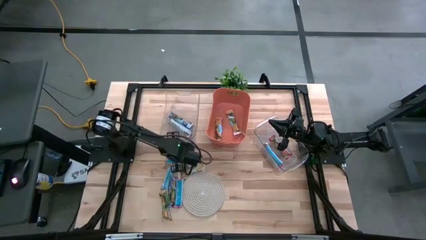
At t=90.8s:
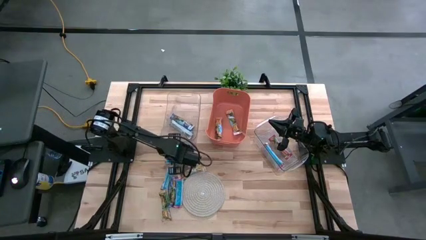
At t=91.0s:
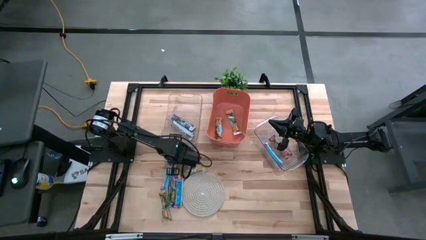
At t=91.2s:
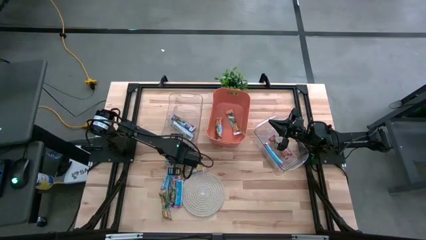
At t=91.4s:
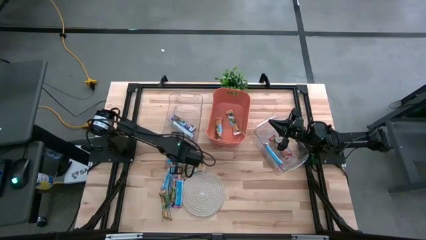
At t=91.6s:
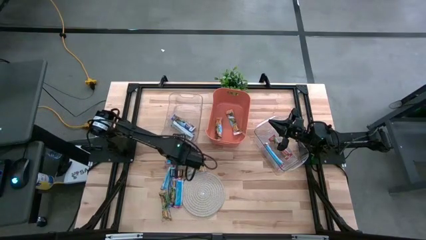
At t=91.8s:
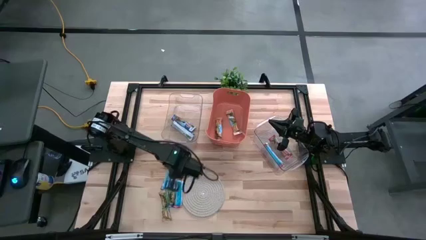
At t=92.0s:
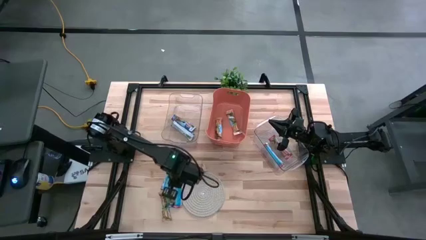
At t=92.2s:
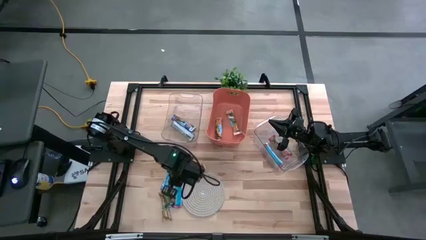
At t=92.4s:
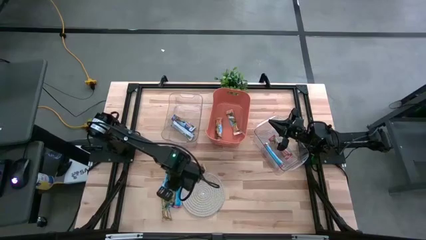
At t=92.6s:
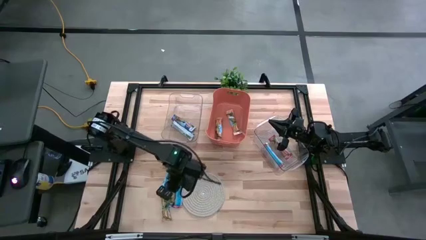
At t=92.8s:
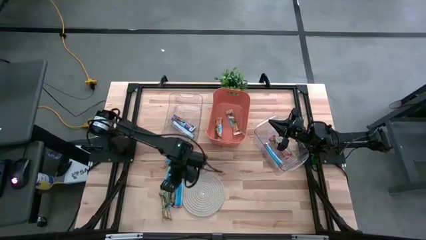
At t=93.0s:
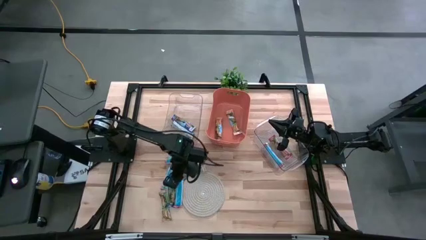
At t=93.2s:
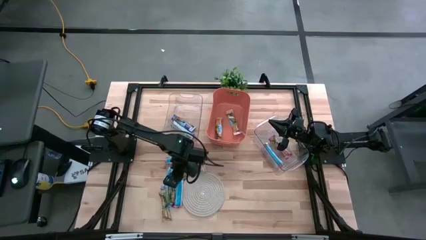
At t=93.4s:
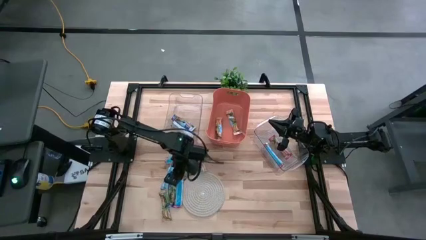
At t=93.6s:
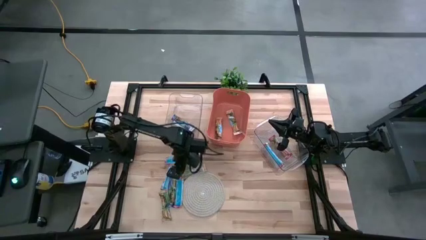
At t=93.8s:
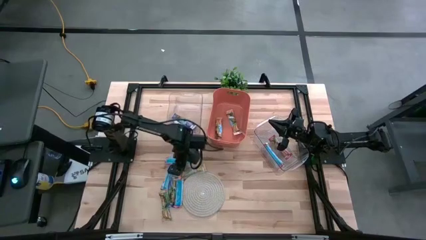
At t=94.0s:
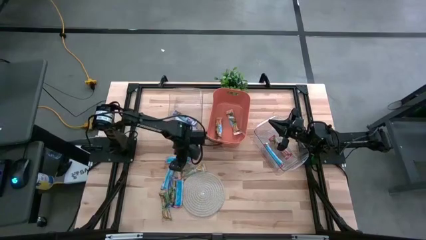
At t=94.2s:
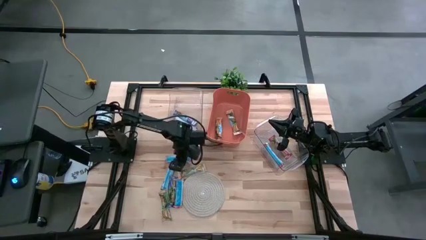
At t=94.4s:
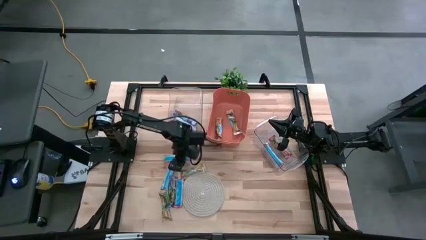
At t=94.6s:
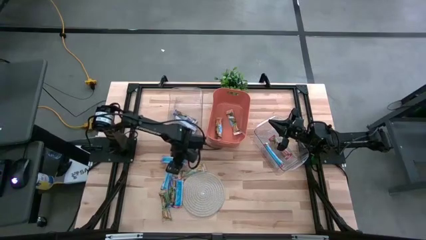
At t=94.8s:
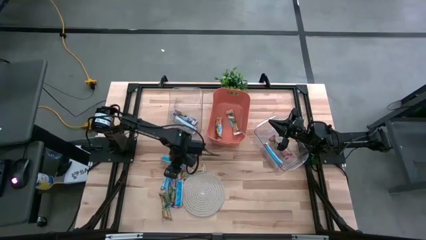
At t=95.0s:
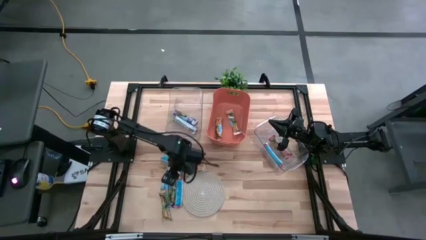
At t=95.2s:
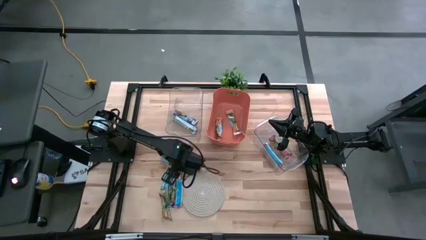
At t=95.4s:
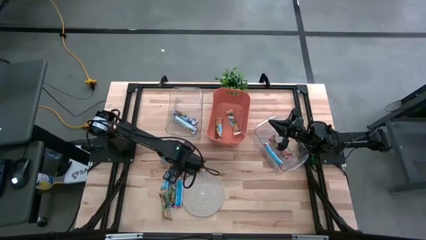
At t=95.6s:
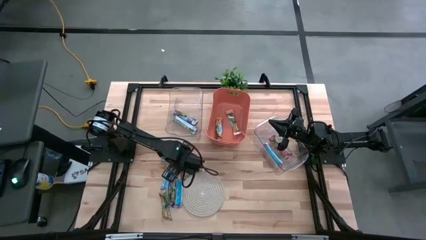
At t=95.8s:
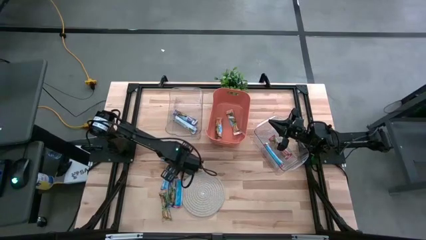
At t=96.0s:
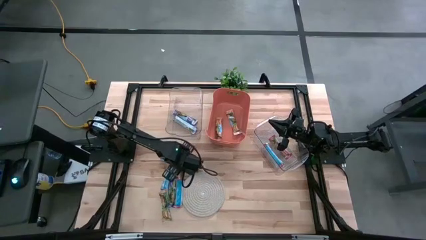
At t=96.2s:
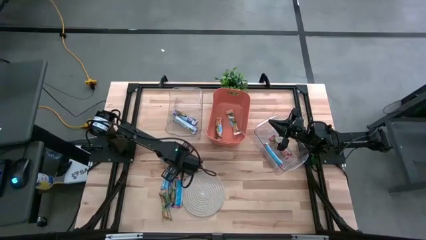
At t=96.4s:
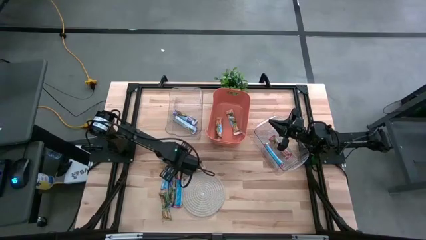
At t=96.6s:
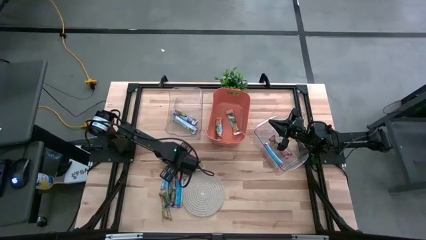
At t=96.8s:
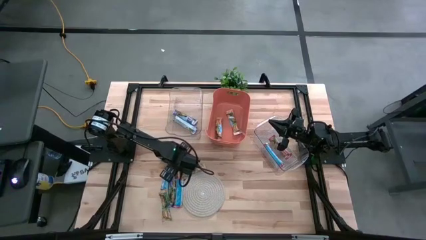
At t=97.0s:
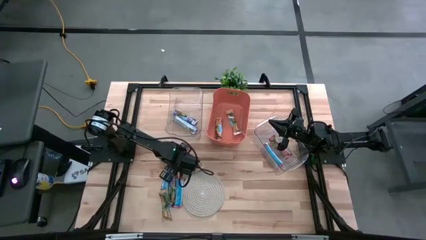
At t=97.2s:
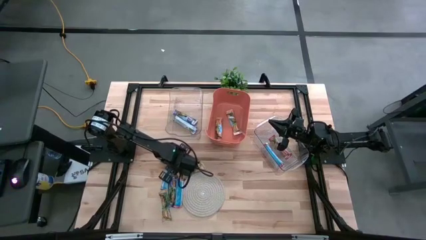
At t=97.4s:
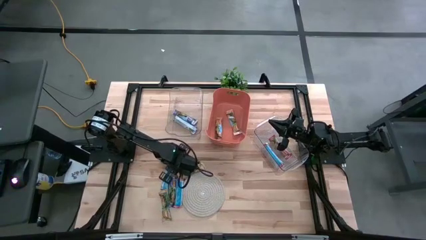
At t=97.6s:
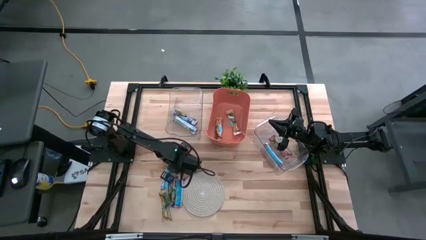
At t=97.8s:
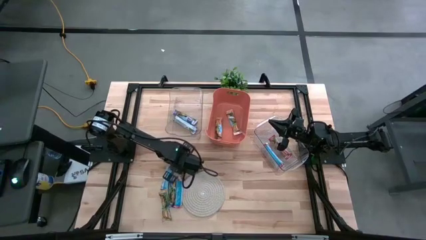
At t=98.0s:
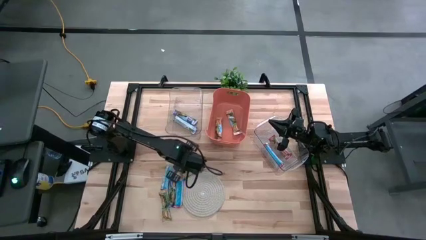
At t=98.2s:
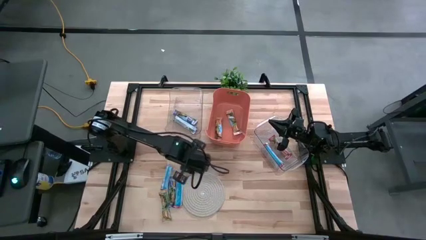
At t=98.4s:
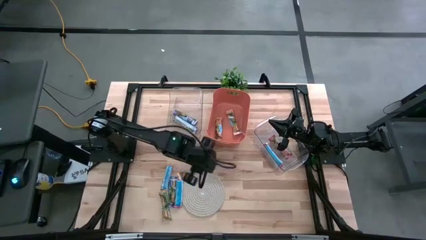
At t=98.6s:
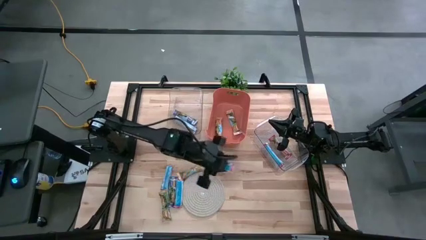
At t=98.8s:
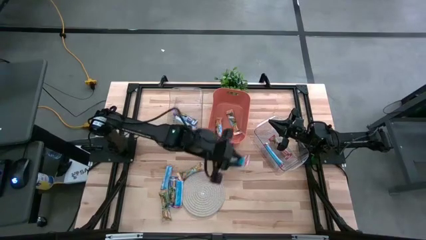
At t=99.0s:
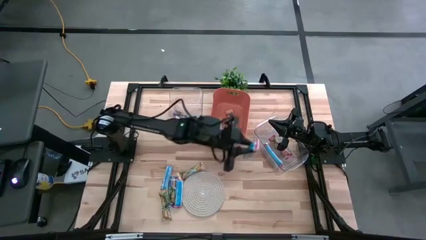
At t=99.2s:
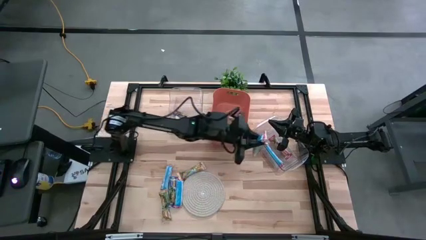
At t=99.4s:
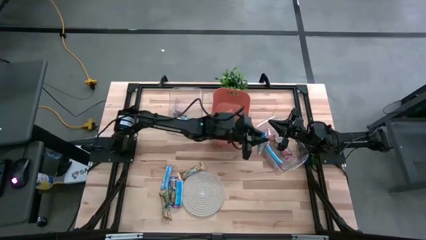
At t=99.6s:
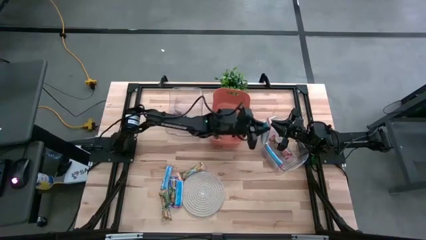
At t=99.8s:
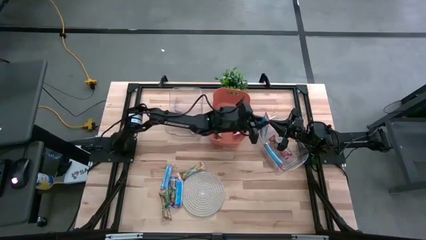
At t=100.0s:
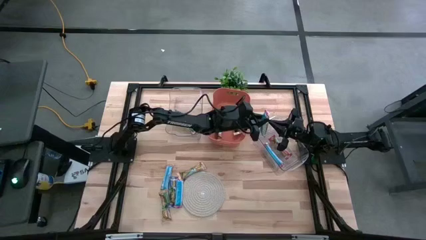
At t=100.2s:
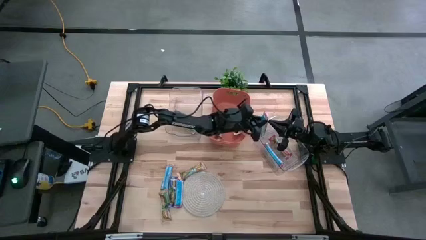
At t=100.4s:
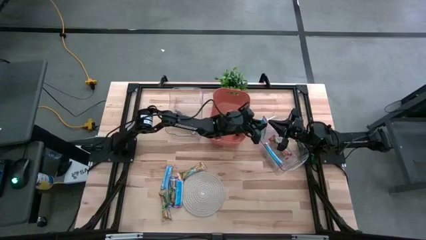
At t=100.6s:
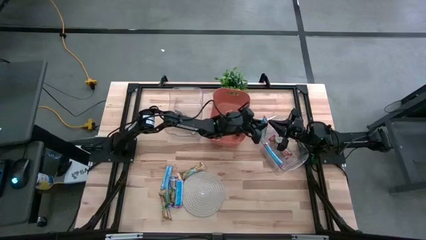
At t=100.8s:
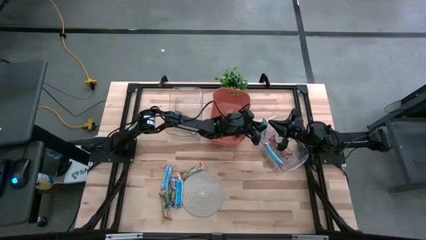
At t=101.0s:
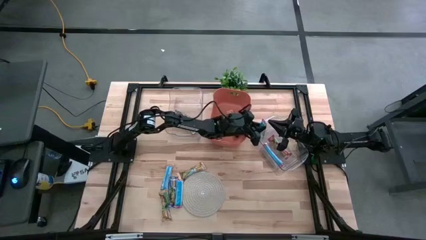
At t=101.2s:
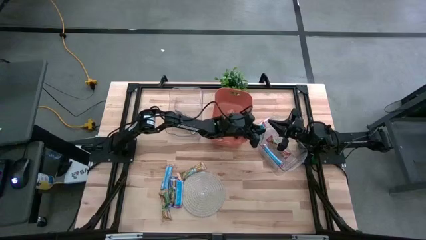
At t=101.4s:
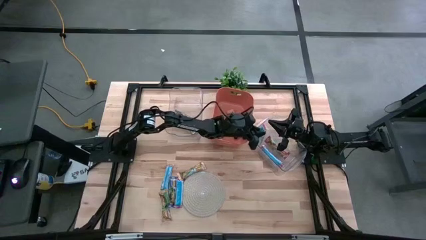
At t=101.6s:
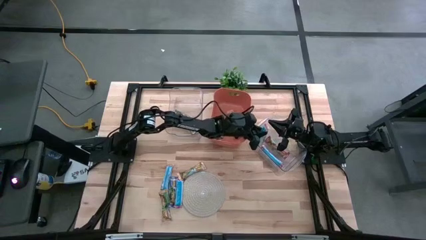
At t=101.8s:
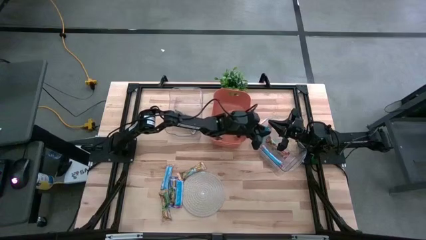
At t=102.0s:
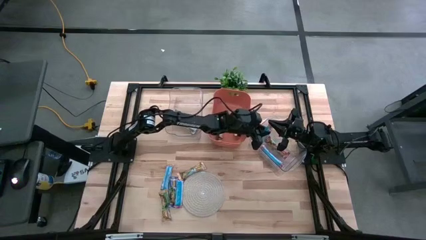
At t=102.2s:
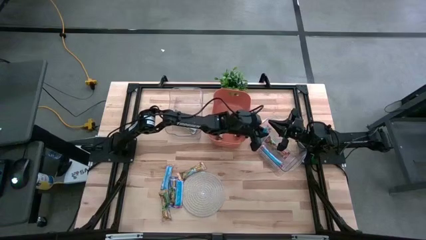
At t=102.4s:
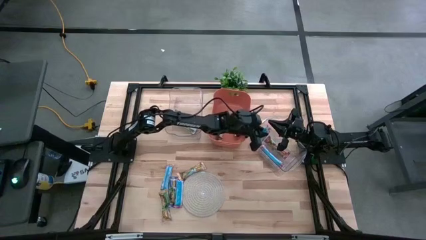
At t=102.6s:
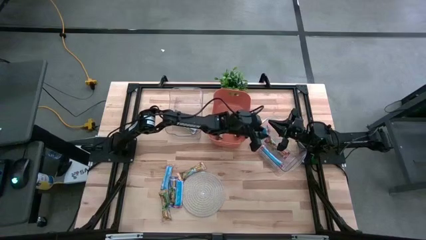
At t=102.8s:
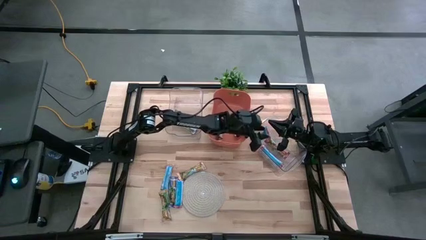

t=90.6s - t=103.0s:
Task: Pick and place Granola Bars by type
Put the red granola bar into the right transparent bin
